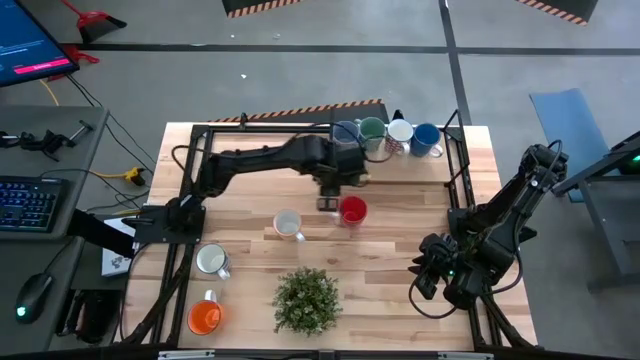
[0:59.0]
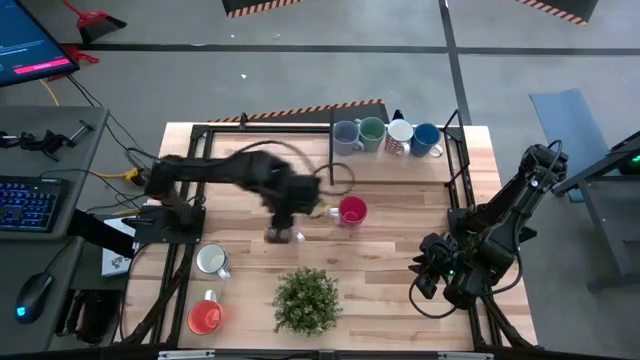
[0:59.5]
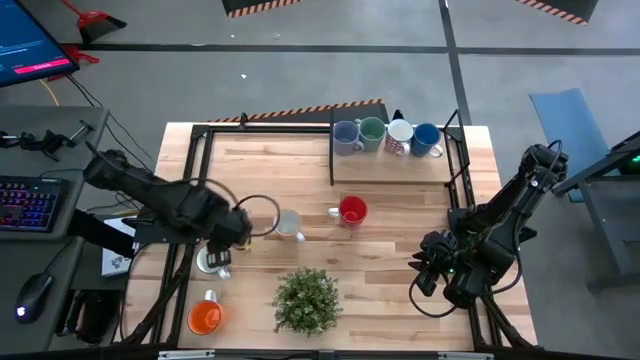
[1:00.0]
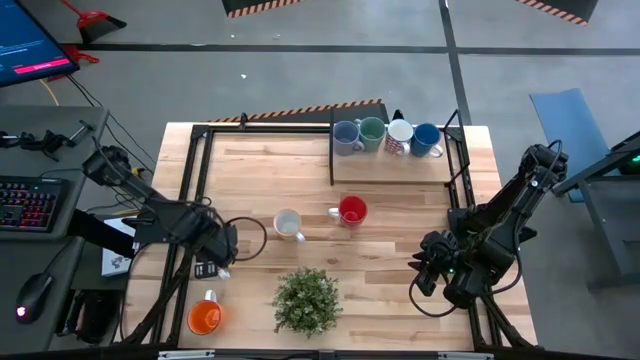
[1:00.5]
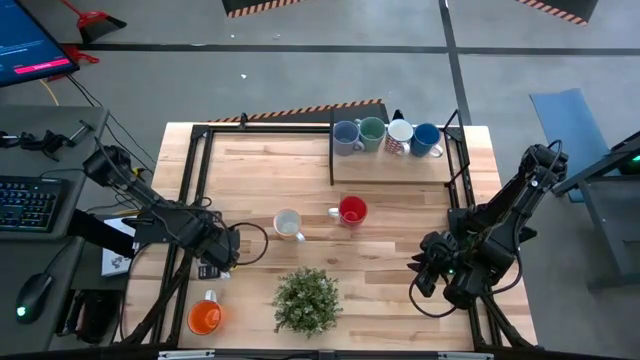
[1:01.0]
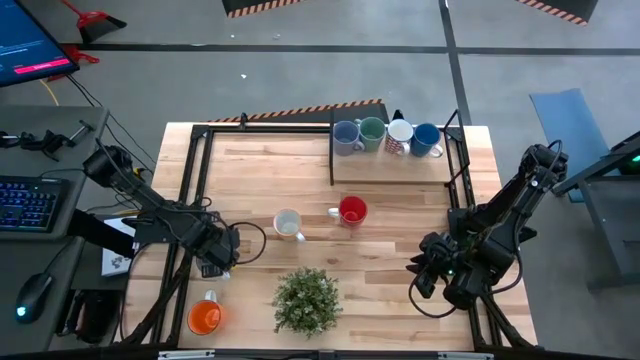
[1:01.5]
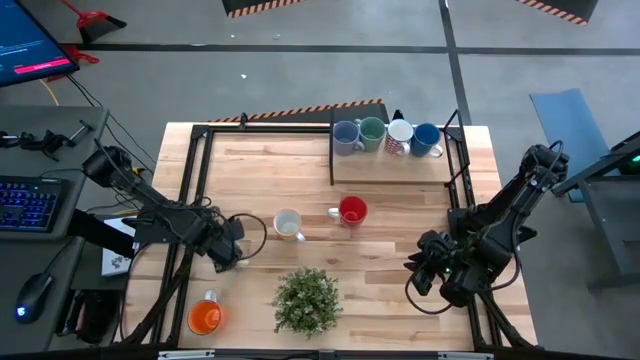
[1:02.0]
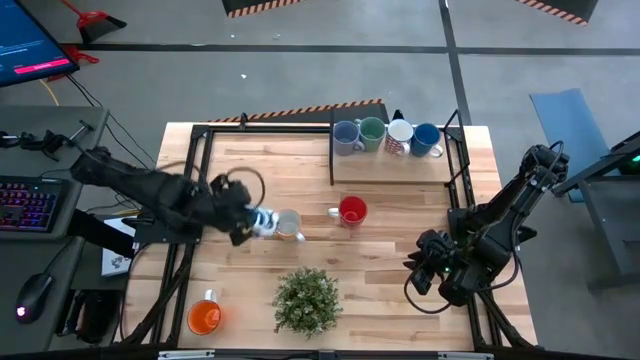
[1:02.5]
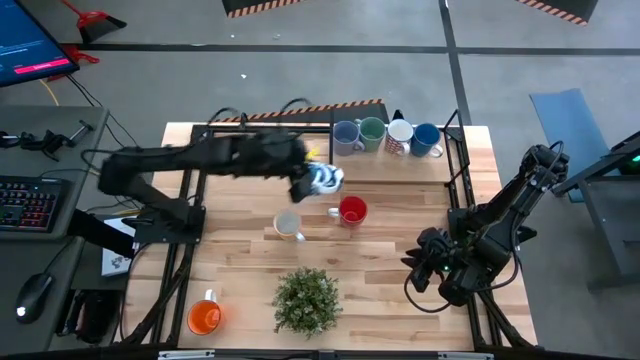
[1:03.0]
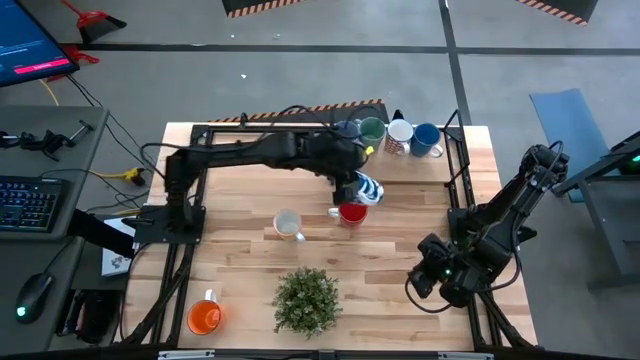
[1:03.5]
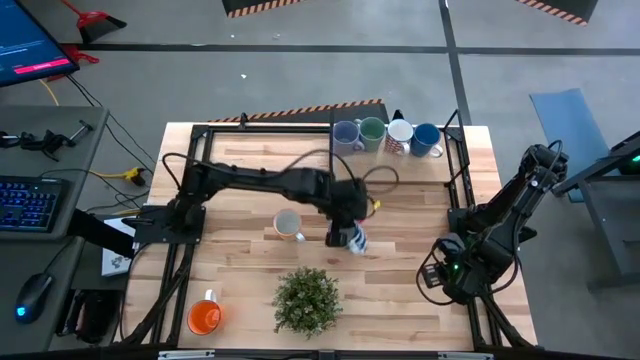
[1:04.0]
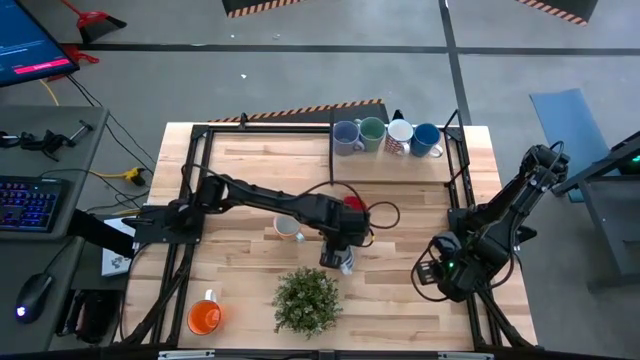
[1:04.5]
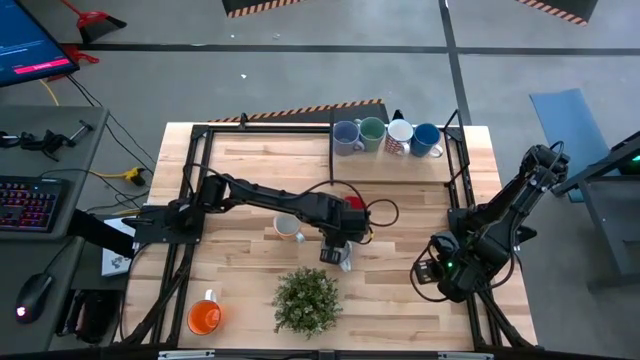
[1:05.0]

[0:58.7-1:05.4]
Task: Place coffee mugs
Move the blue patterned mug to the center of the table

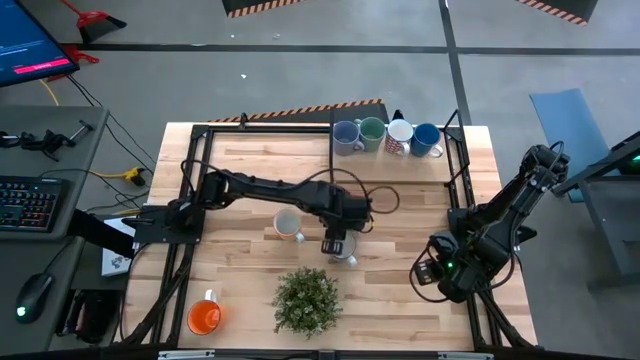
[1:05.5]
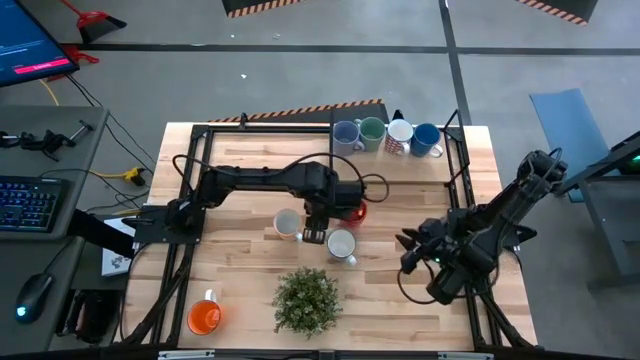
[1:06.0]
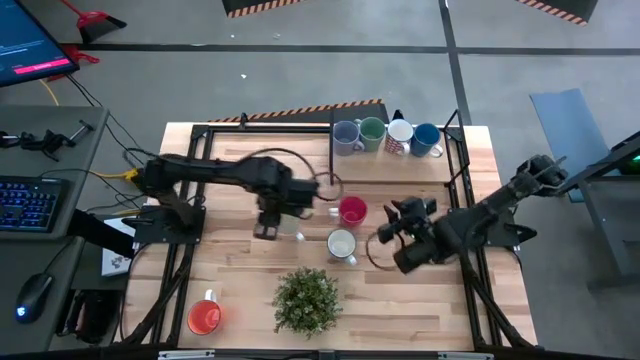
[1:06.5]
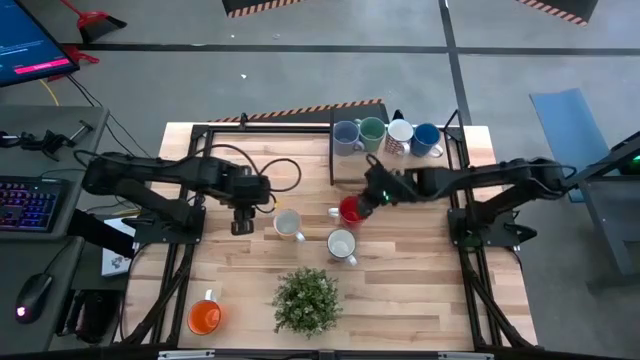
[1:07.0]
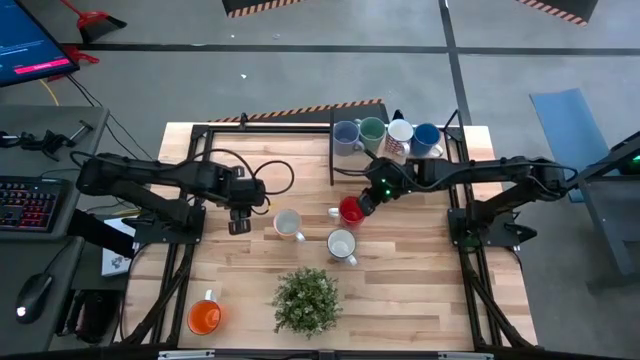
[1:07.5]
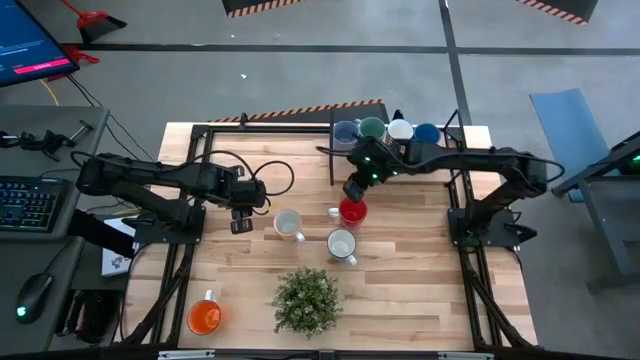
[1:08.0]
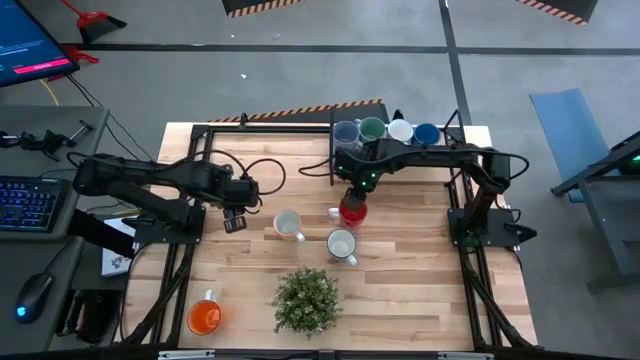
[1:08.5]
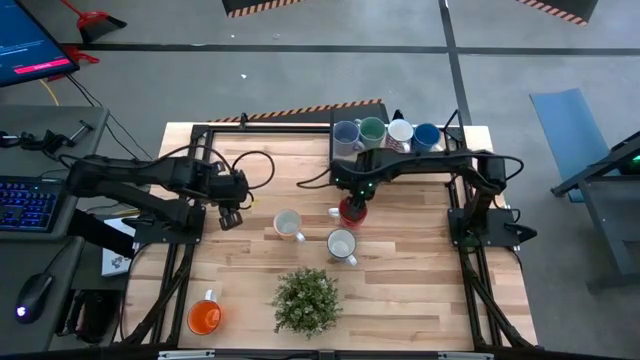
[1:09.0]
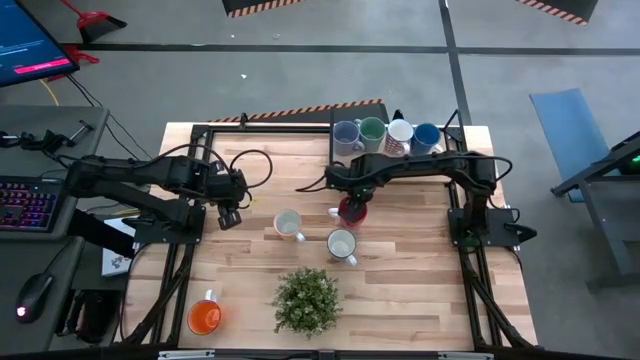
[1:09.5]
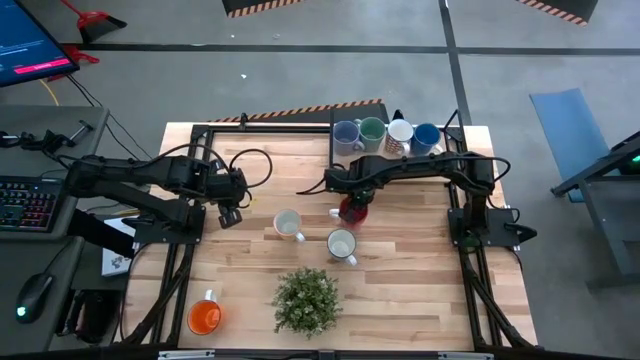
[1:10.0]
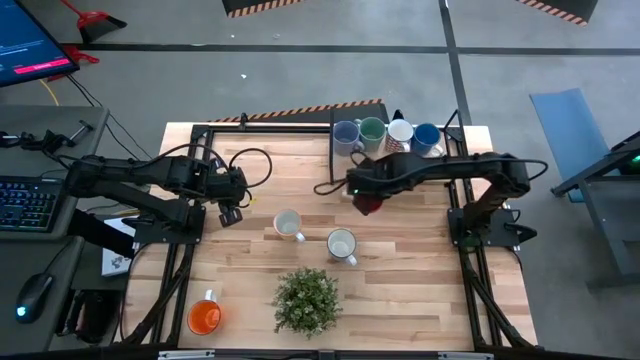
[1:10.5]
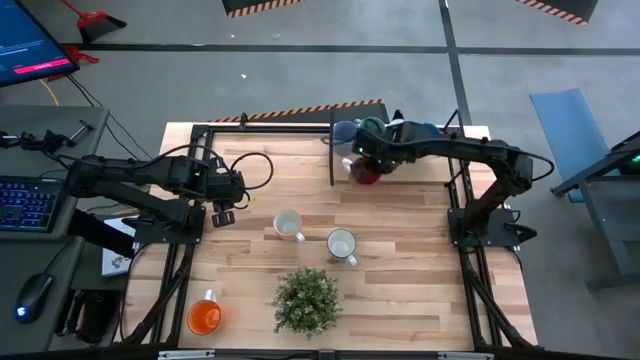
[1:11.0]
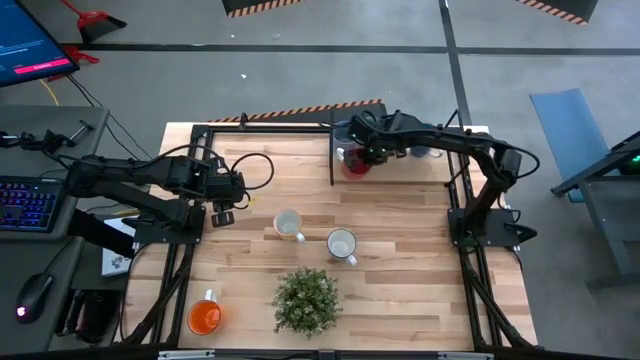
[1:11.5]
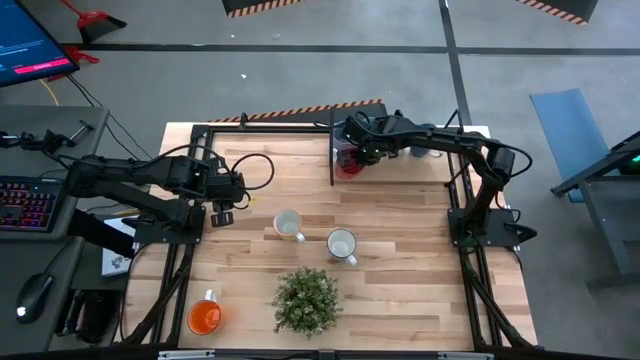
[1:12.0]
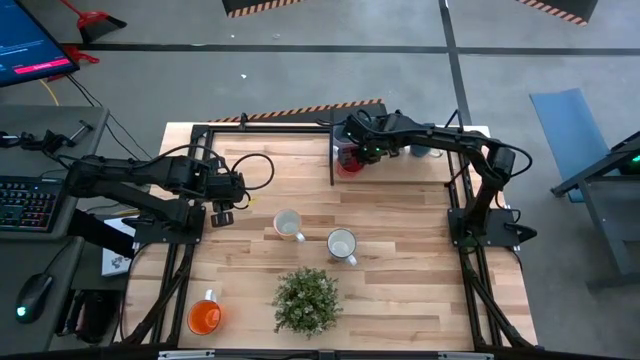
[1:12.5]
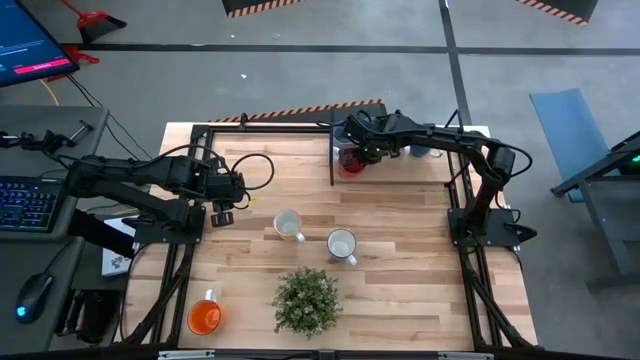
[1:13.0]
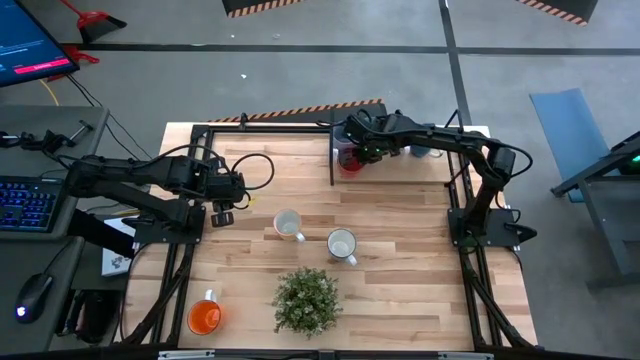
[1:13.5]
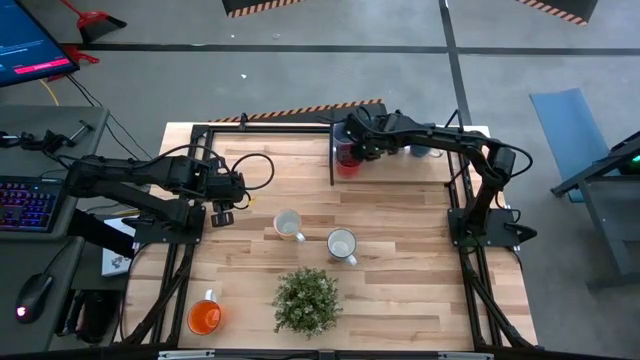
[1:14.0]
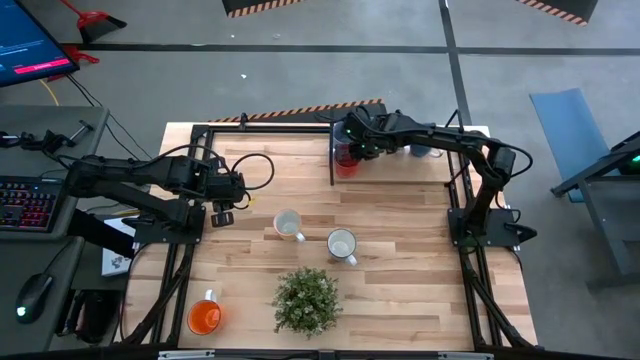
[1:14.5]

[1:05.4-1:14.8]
Put the red mug on the shelf

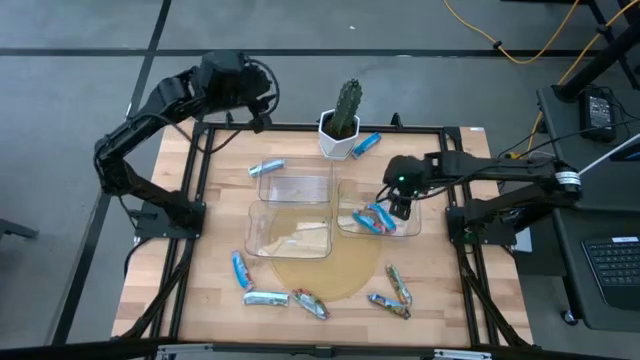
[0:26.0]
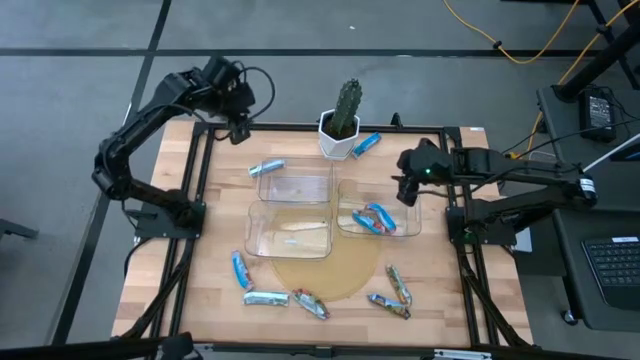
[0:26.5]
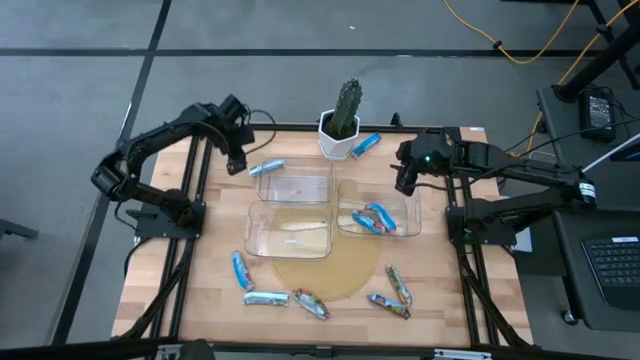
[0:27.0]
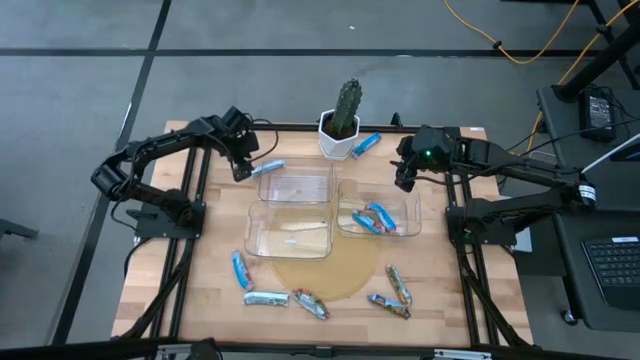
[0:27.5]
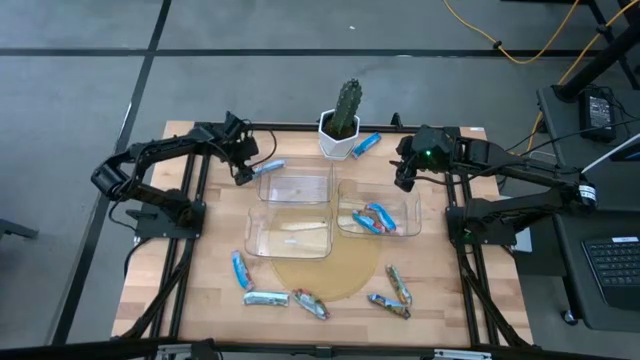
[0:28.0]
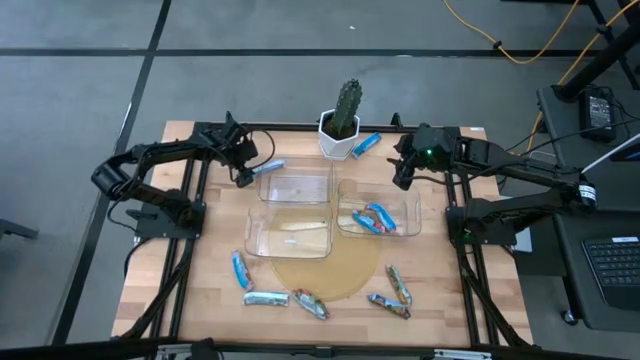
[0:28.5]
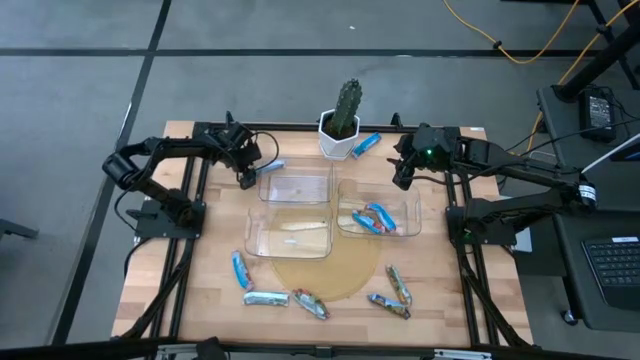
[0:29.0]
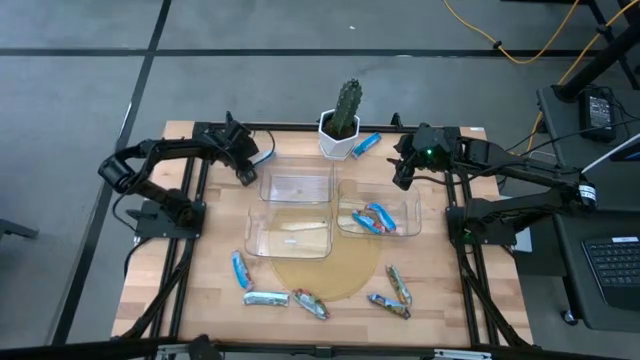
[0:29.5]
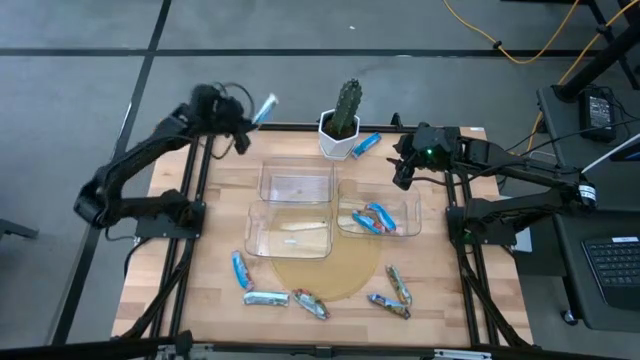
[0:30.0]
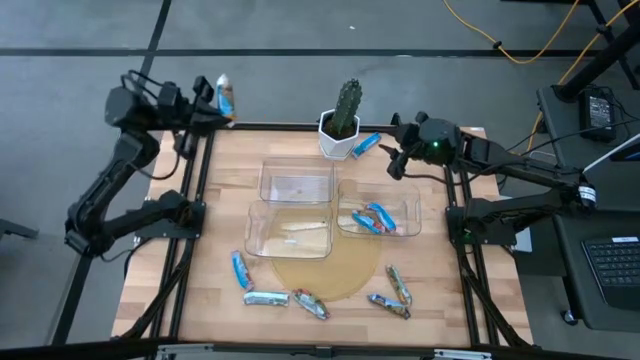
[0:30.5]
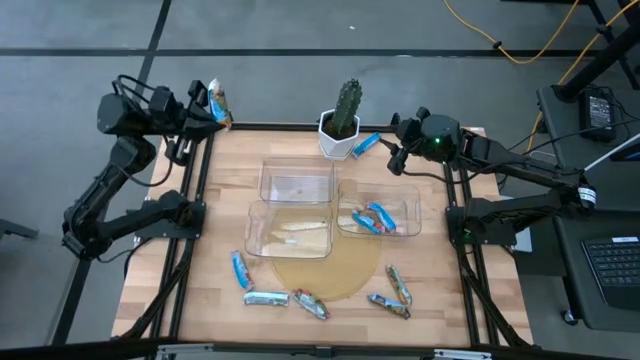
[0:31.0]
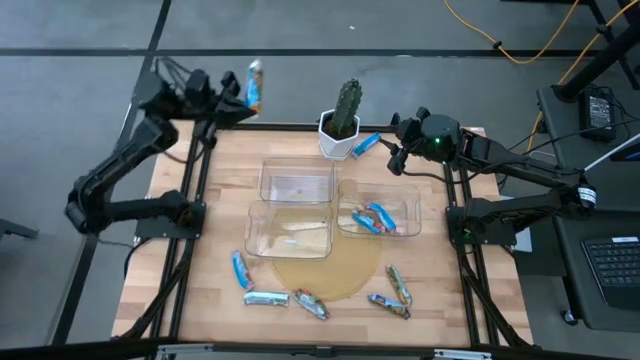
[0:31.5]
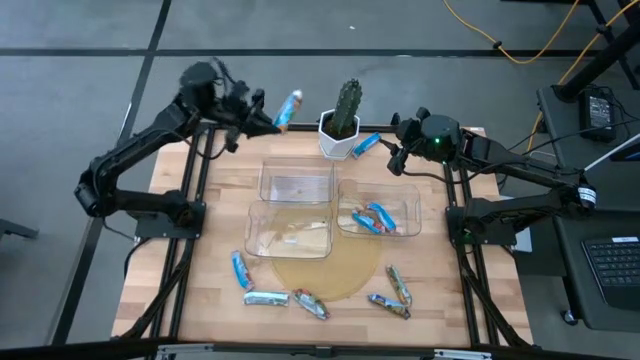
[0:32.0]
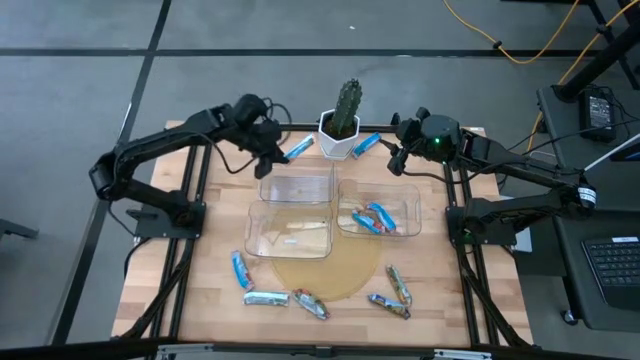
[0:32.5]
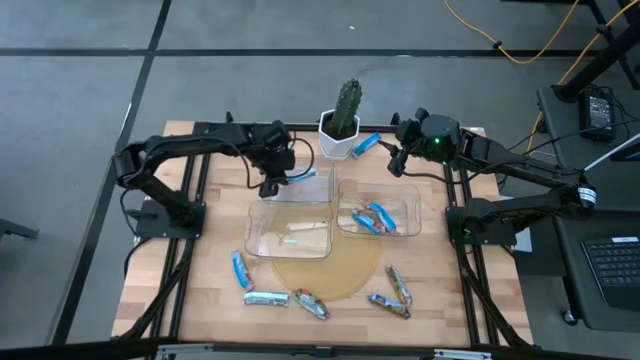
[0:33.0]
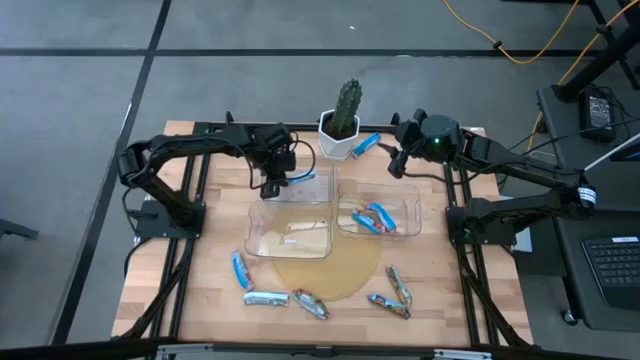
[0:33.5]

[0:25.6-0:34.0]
Task: Pick and place Granola Bars by type
Put the top yellow granola bar into the top bin
